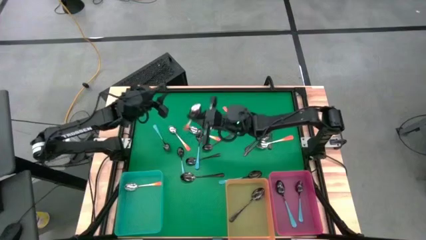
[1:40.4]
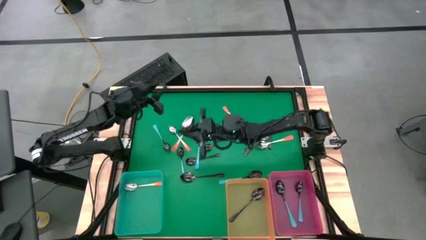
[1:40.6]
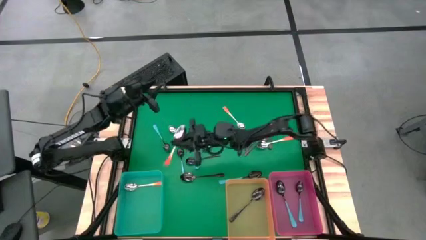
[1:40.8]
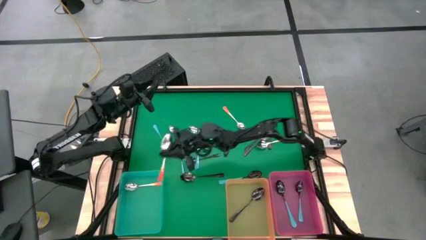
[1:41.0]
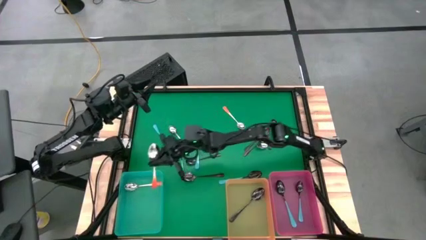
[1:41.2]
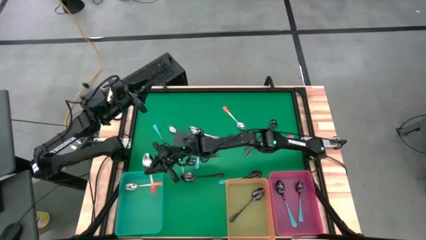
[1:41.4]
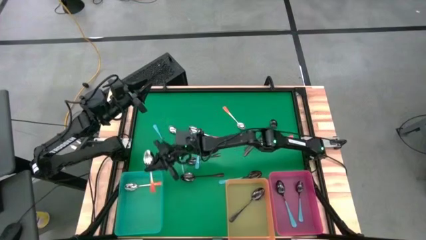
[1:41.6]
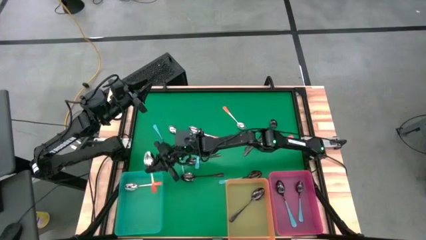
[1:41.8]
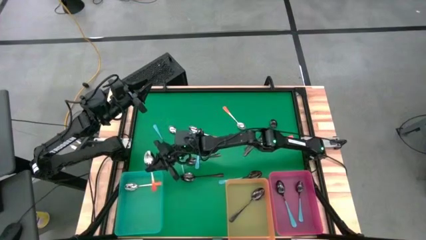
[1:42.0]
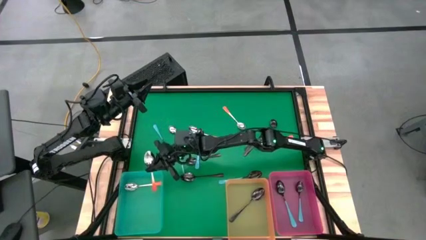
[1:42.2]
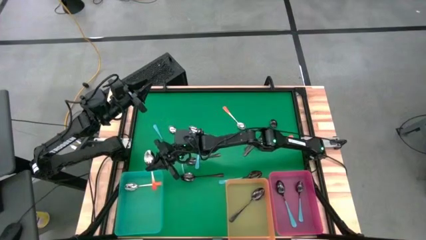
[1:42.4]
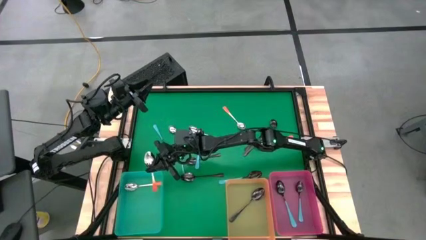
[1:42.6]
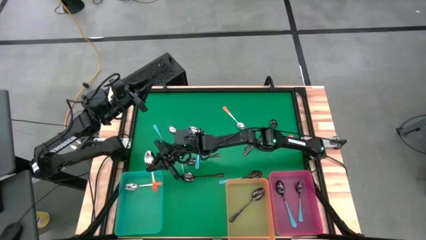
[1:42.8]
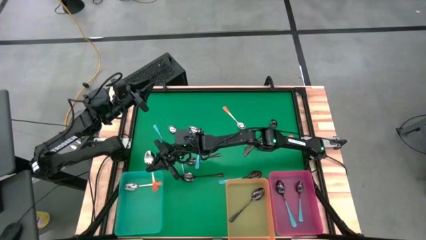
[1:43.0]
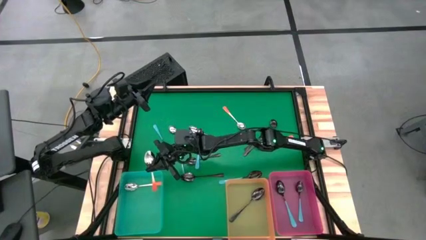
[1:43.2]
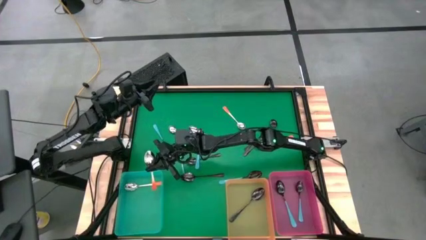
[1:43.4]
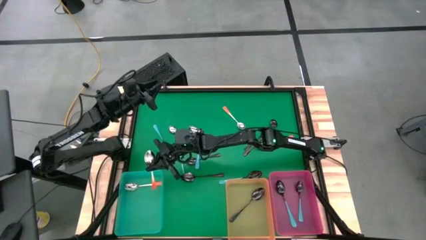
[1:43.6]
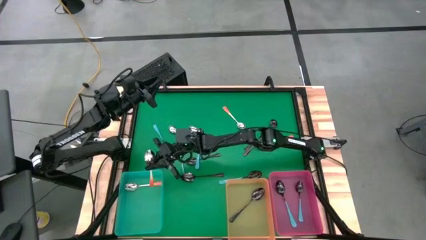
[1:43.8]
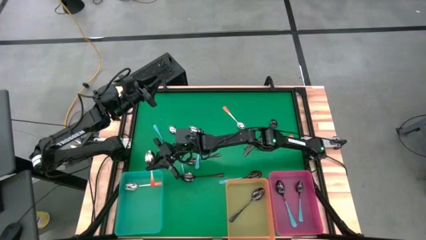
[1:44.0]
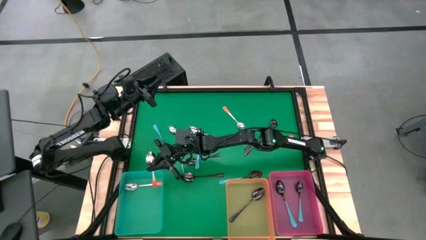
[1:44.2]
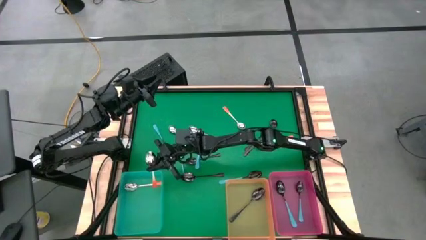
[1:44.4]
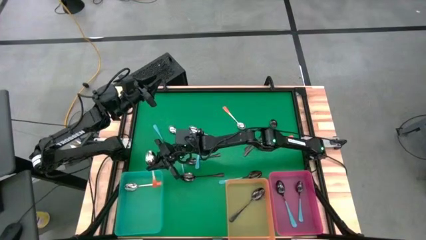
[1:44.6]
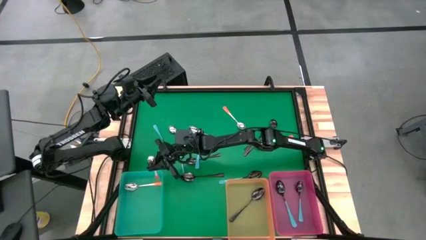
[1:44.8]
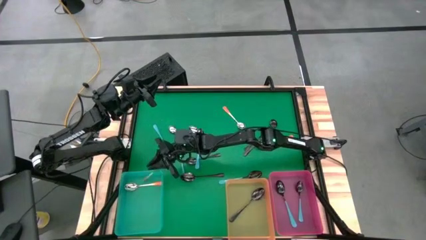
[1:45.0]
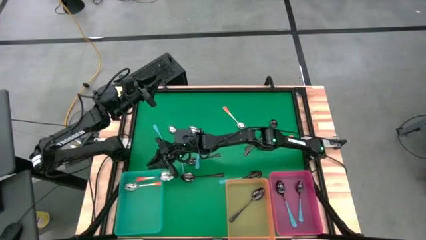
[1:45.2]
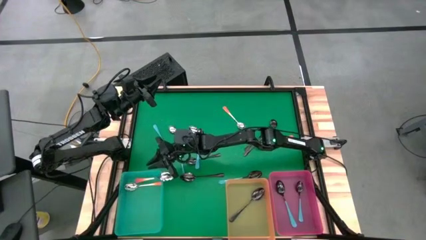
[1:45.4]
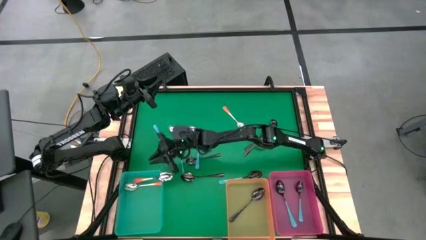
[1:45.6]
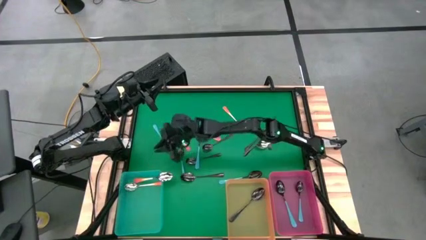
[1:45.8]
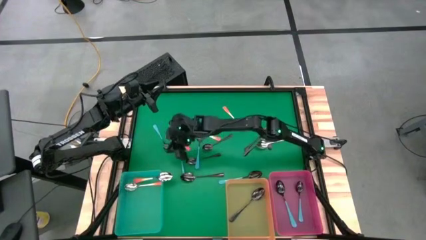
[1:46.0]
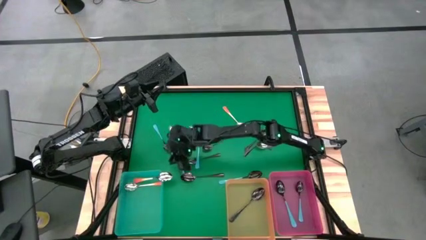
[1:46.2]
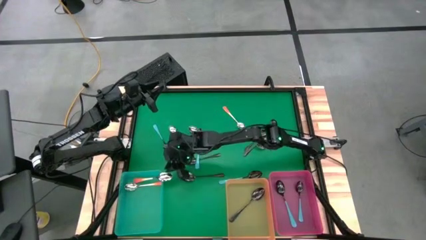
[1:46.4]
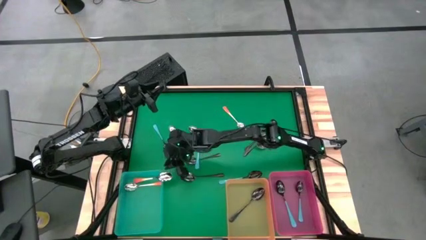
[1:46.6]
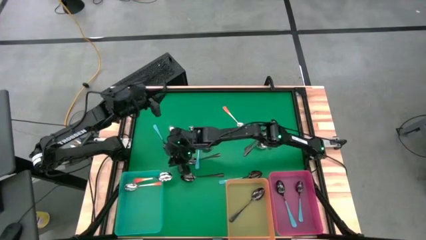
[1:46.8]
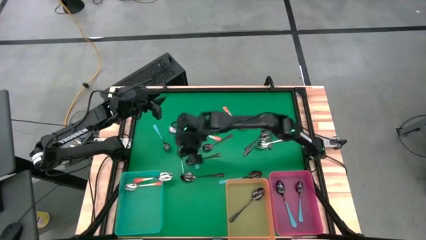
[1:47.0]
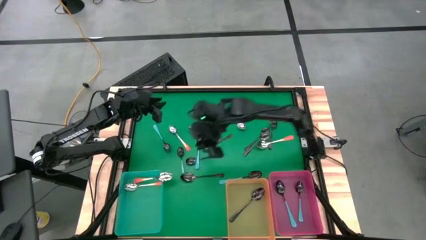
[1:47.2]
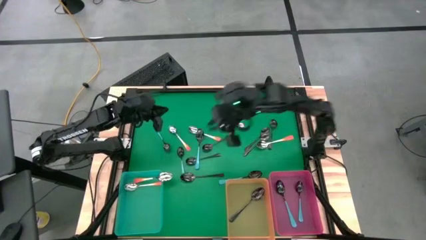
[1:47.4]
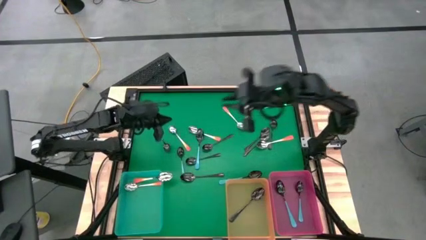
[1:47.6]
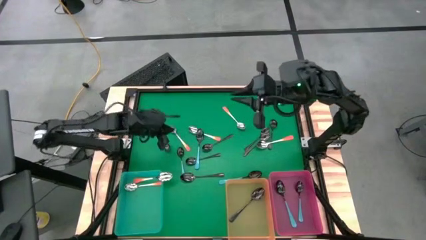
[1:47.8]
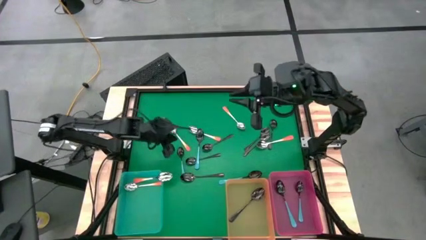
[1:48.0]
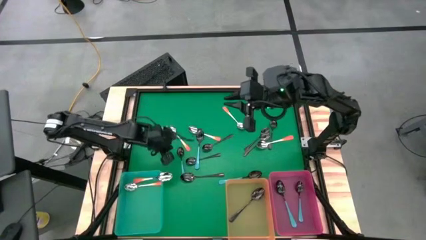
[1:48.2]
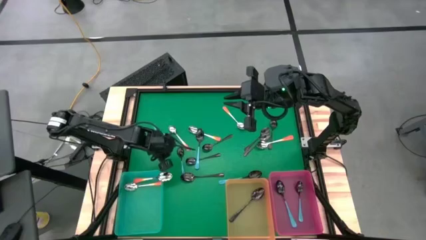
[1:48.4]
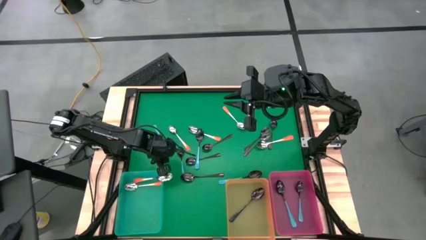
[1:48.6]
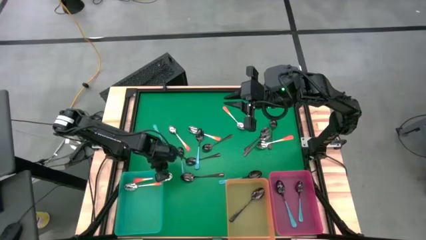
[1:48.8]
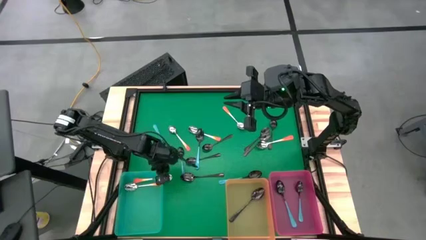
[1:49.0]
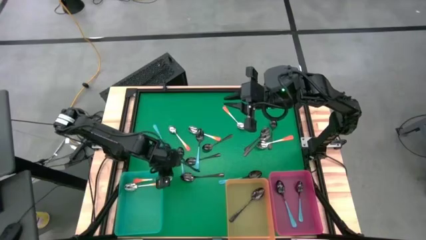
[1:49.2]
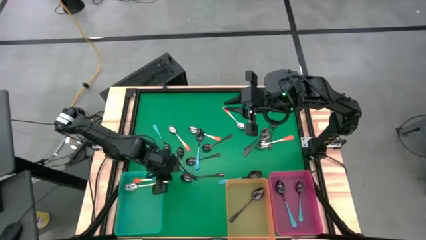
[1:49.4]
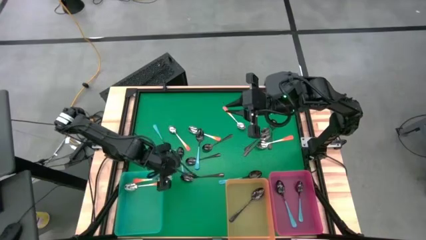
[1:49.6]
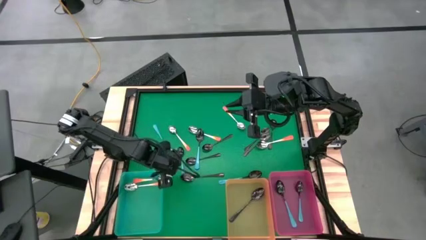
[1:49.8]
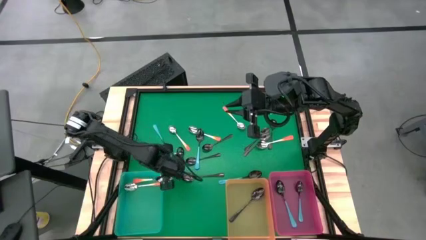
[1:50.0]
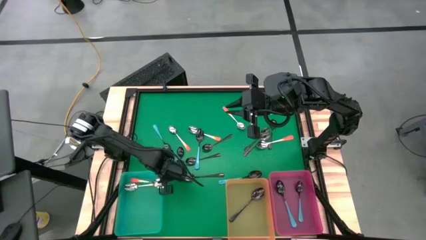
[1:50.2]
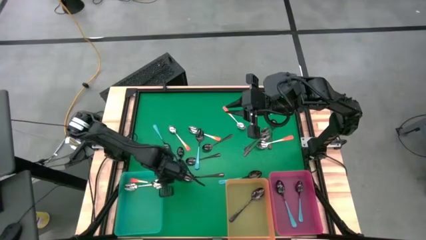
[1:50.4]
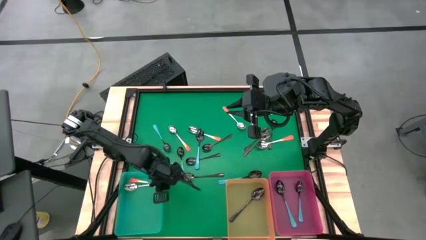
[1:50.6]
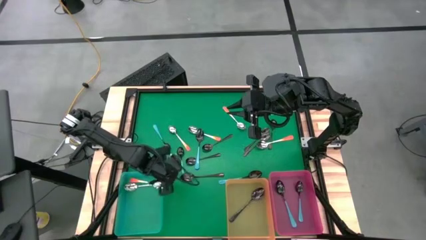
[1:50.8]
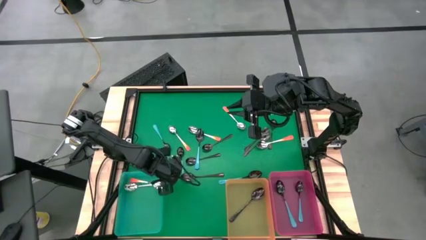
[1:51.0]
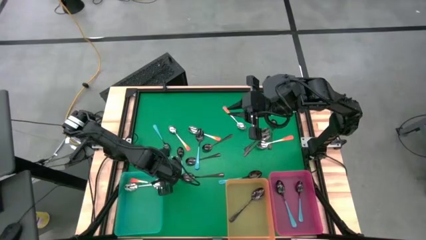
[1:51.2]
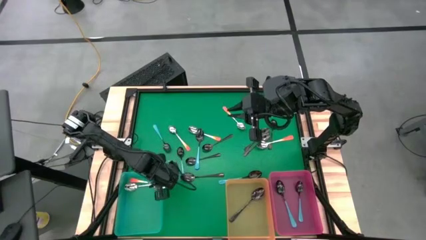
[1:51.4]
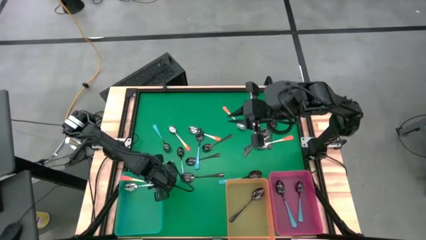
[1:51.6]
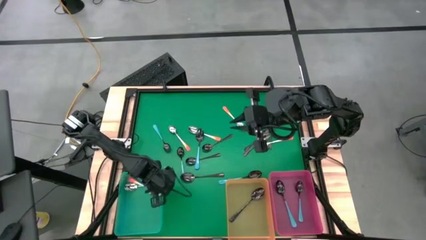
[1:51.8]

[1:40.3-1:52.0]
Task: Sort silverware by color (type)
Put the orange spoon into the green bin

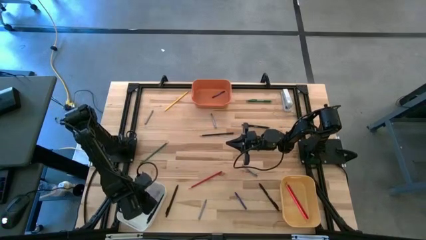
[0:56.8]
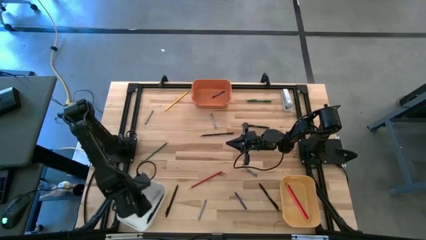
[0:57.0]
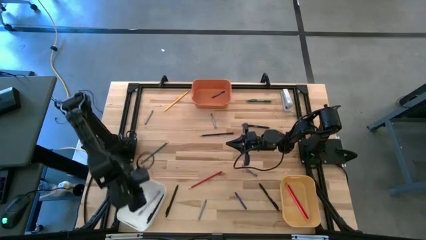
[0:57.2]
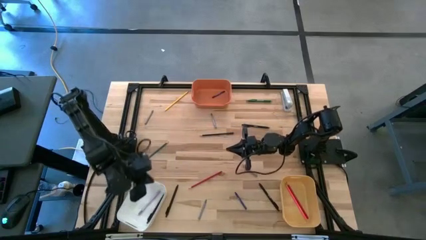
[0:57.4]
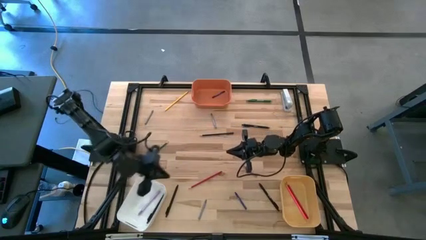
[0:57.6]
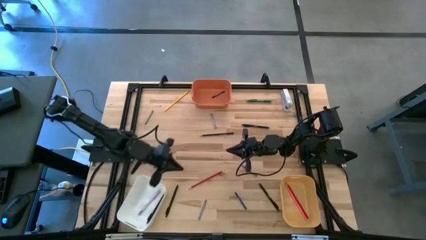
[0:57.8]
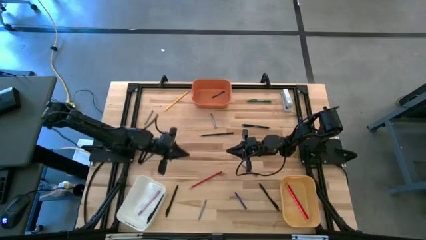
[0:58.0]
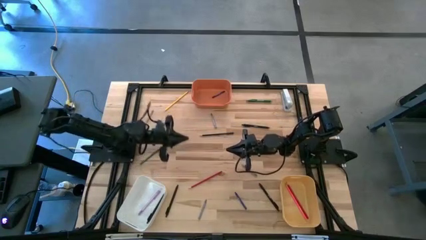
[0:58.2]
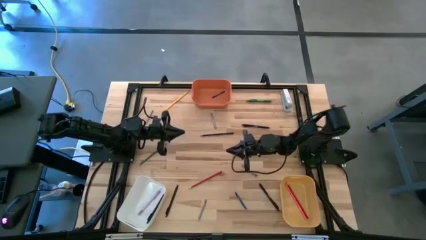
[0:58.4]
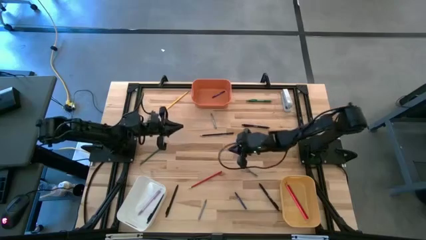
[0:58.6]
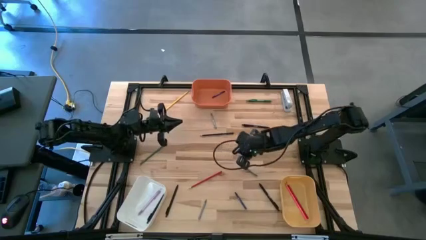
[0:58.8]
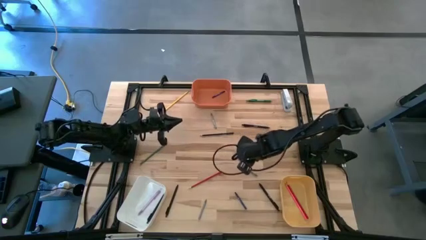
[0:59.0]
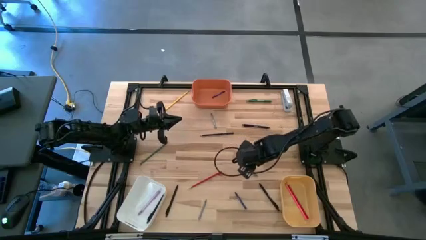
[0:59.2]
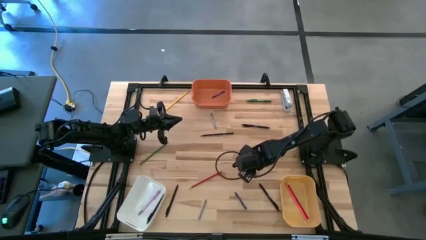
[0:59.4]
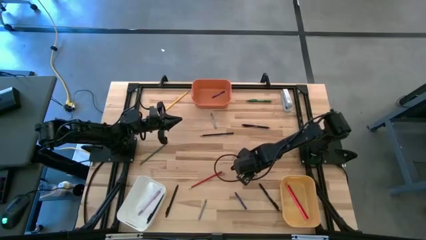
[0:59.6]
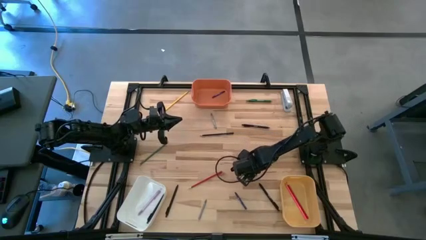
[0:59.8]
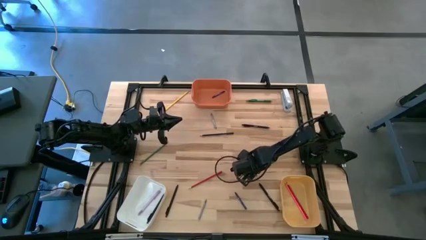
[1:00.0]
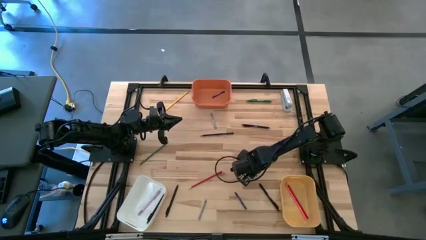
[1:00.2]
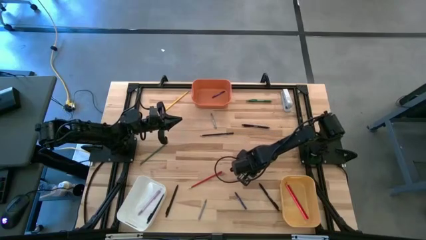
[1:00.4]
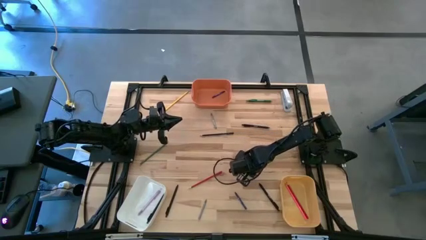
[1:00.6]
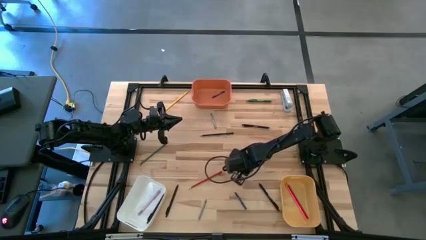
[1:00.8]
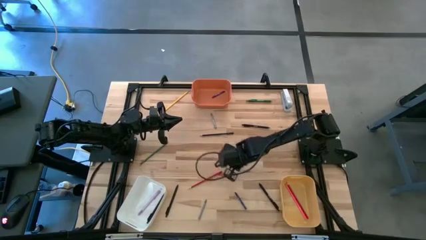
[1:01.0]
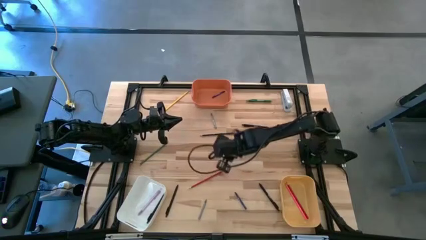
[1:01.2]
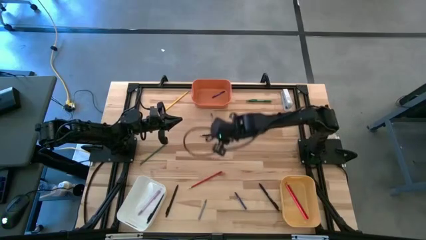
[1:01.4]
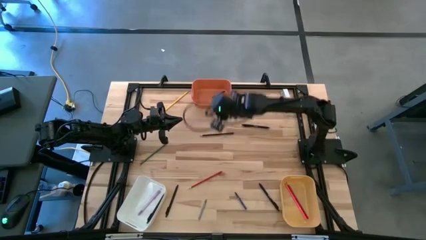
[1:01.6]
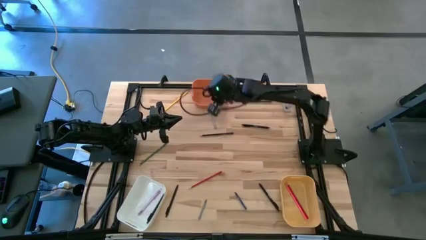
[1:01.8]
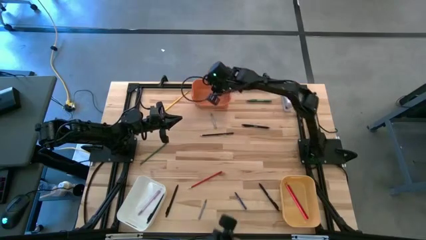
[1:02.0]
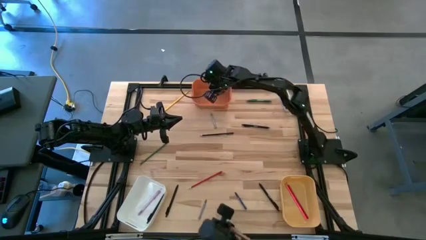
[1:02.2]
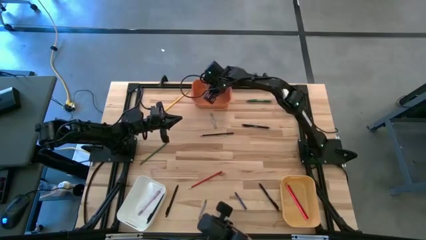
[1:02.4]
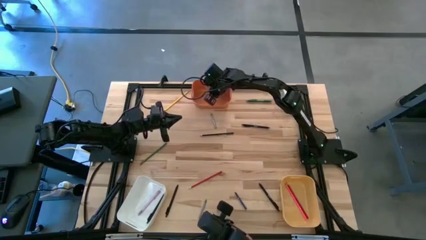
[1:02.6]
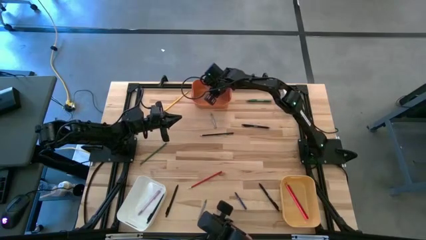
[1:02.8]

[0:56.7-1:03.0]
Task: Sort crayons/erasers/pens/pencils in bins
Put the gray crayon into the orange bin
